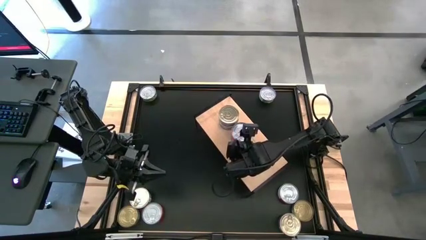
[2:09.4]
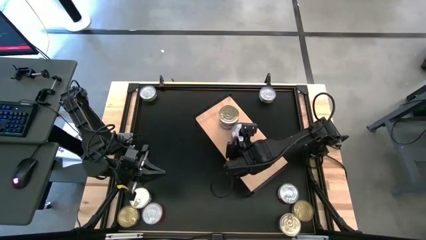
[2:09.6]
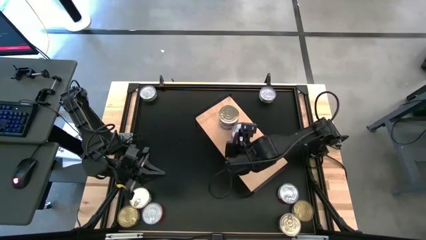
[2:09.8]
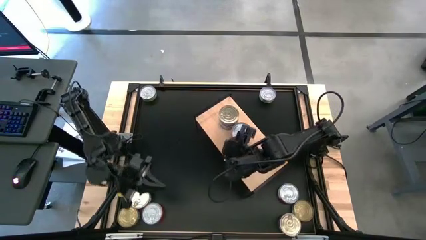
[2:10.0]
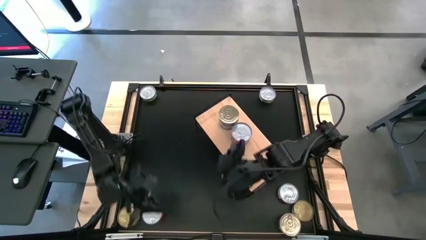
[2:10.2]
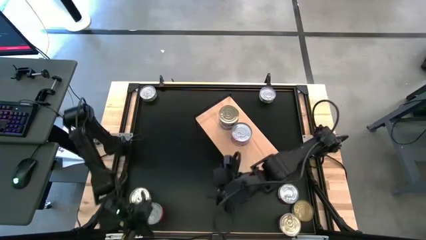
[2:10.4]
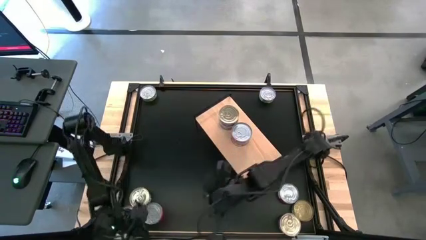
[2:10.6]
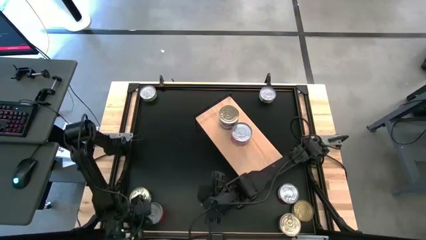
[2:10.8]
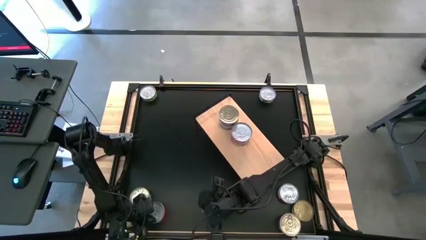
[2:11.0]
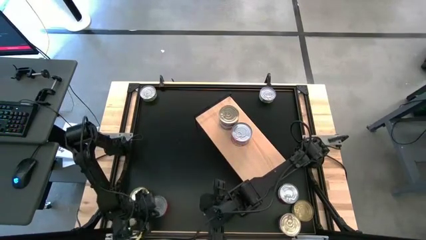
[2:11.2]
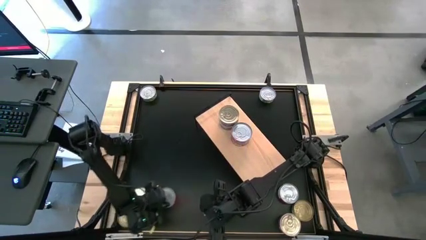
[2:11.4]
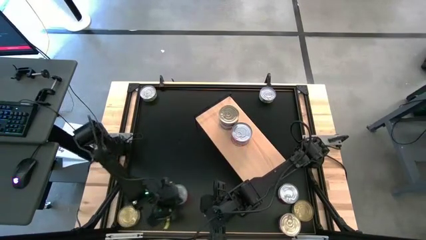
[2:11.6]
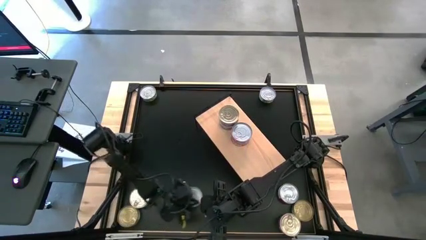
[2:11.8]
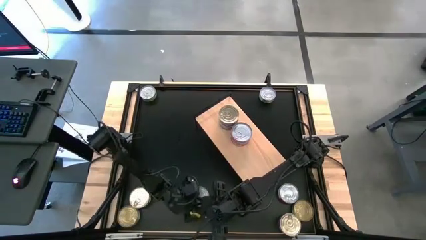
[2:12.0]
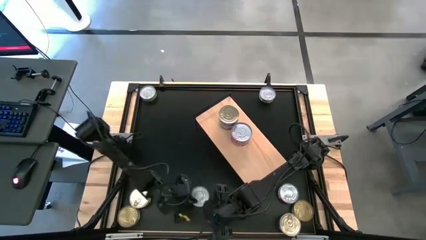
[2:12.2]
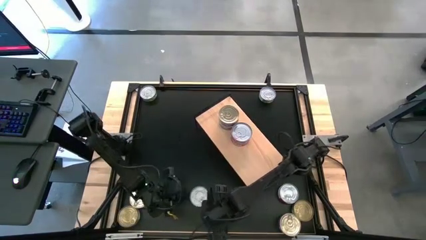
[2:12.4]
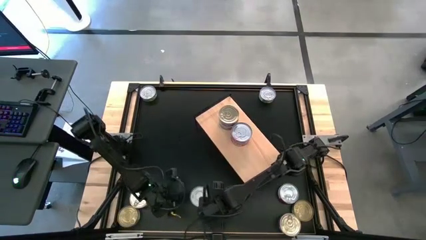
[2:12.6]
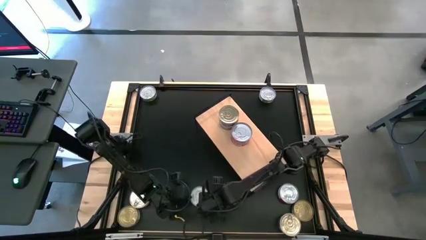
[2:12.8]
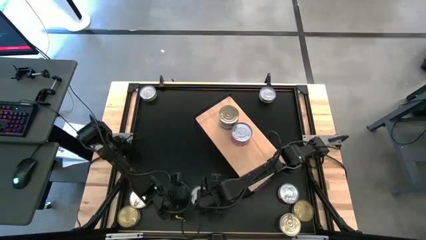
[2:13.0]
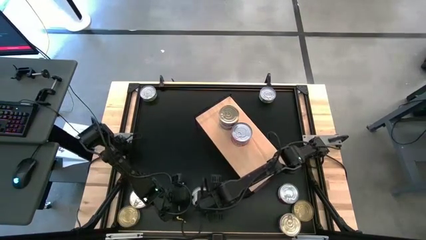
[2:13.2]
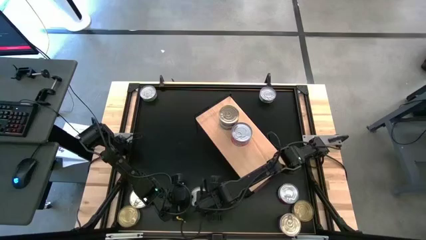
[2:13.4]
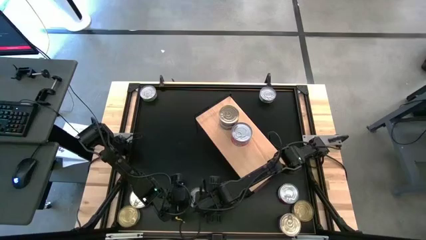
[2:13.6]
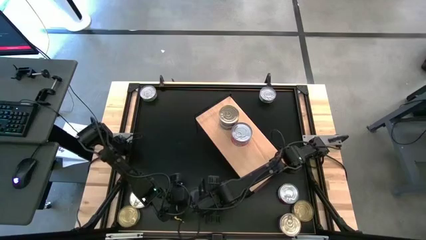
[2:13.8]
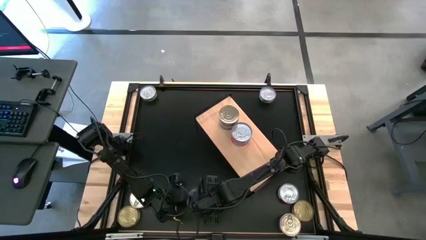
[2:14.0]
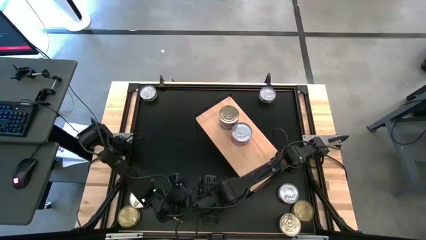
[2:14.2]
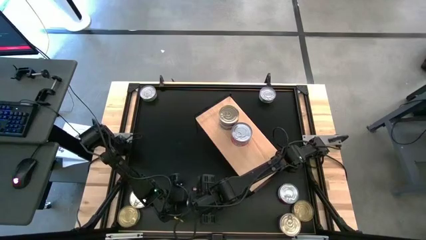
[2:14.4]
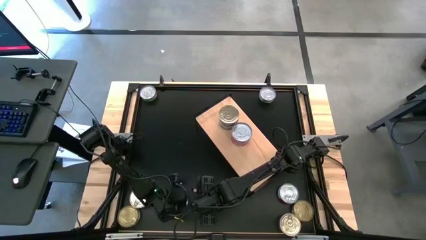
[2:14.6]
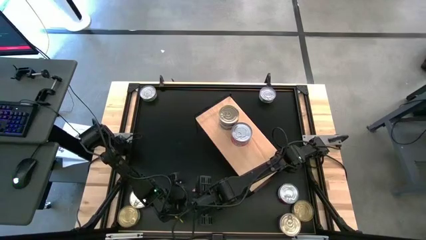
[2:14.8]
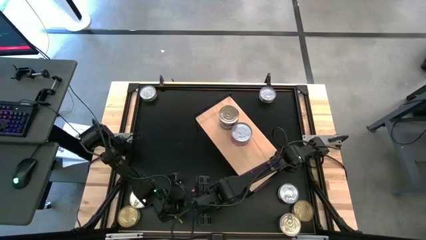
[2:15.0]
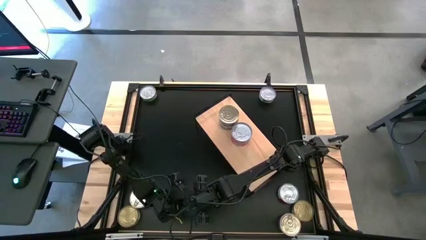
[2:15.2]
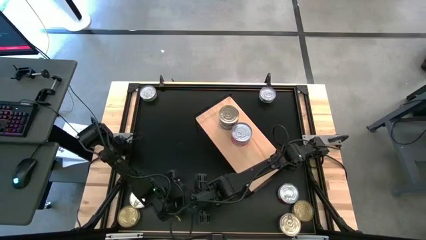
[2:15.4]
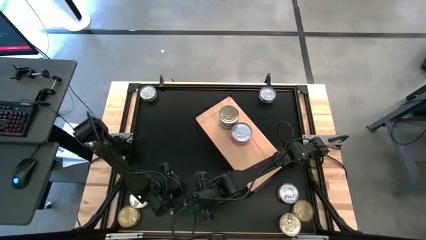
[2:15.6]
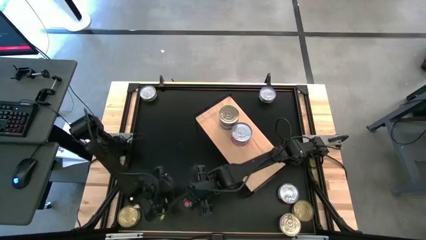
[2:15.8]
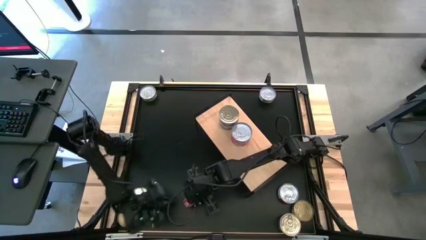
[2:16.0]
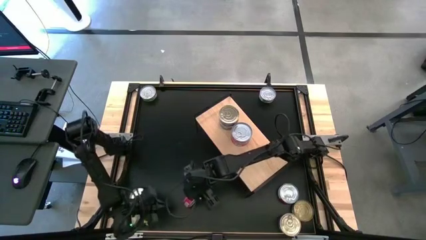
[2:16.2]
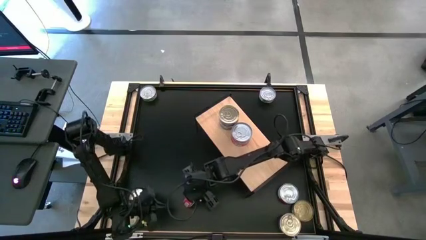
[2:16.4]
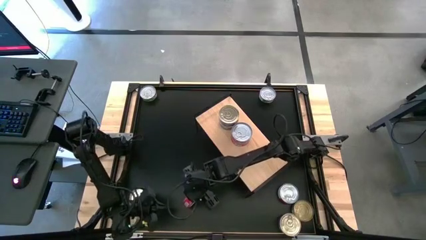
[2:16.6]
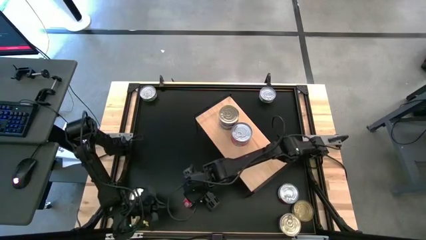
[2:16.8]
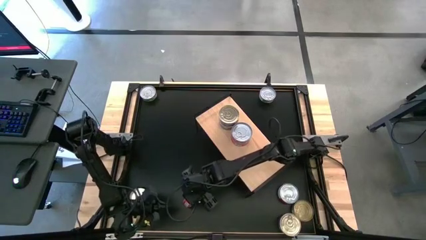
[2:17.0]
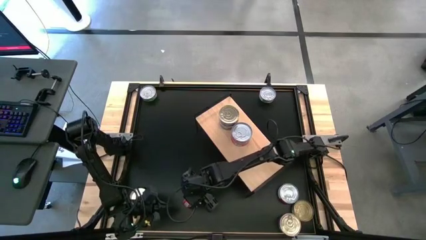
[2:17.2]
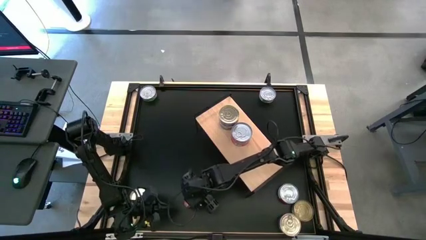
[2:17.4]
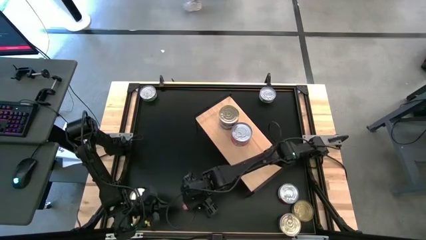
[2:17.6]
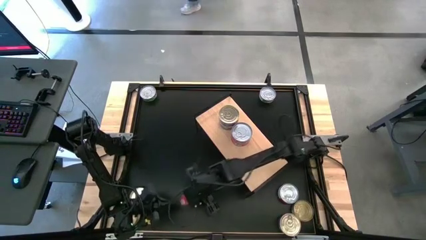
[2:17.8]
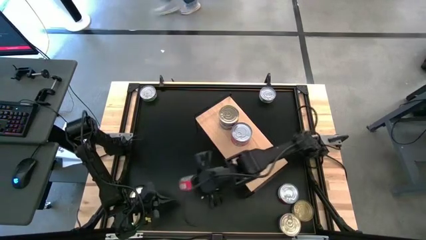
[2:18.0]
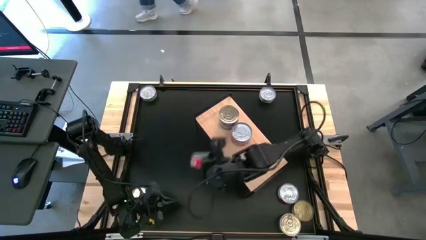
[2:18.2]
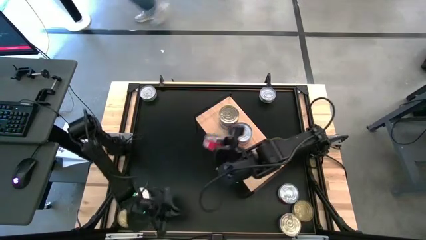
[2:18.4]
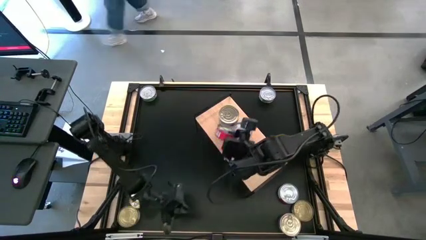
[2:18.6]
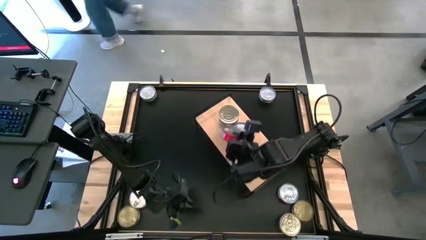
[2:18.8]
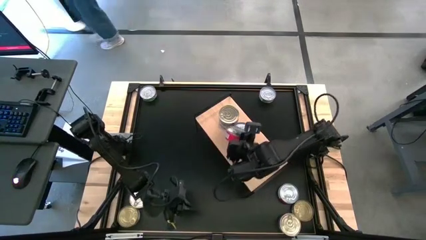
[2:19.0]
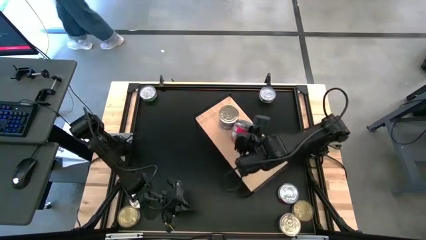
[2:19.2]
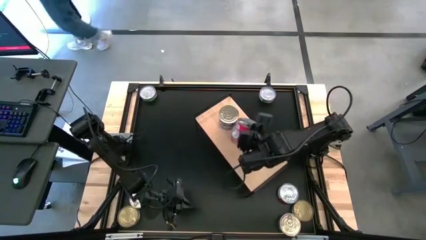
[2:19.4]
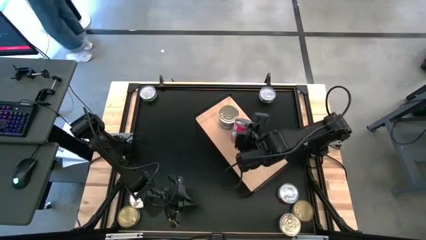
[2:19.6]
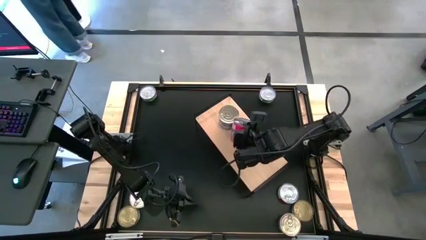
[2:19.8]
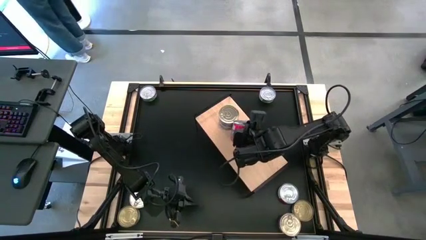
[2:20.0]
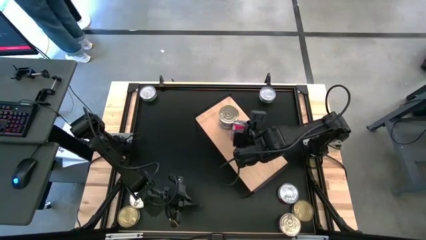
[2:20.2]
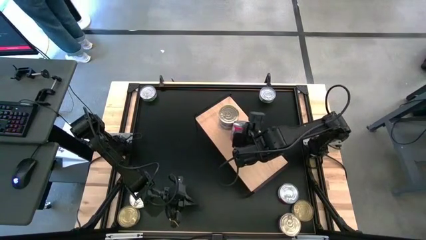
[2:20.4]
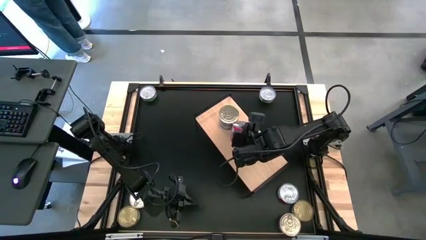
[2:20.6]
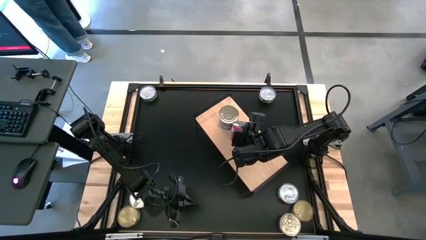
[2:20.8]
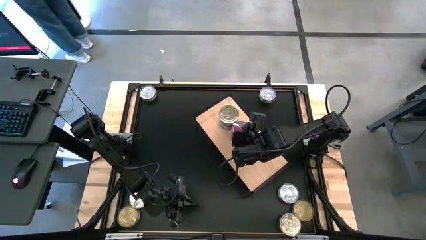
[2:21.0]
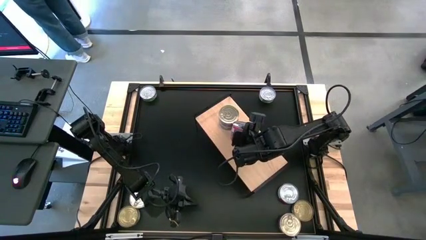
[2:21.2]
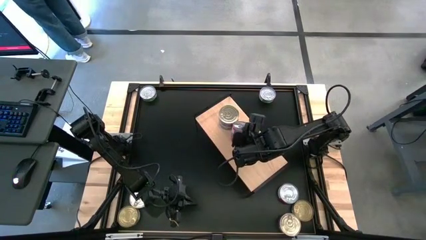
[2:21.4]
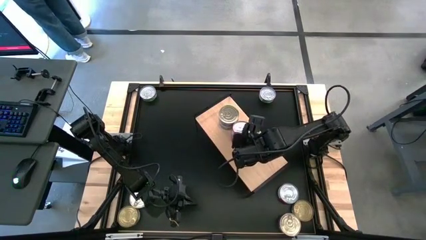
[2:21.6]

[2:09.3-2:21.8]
Task: Stack canned seafood by type on shelf
Stack the red tuna can on top of the red tuna can on the shelf
